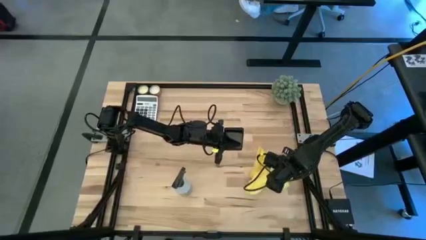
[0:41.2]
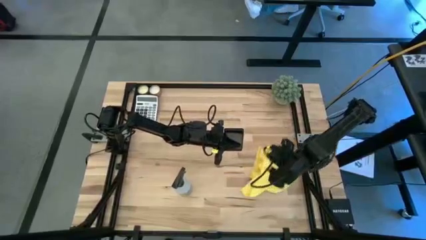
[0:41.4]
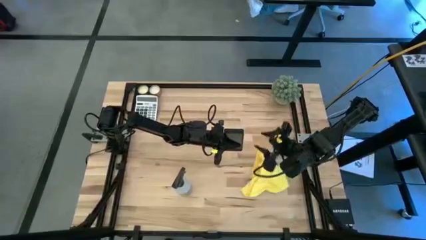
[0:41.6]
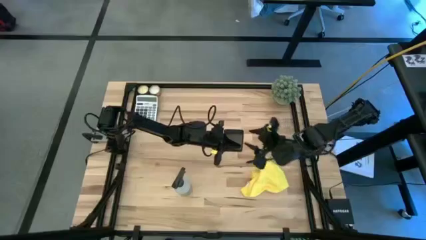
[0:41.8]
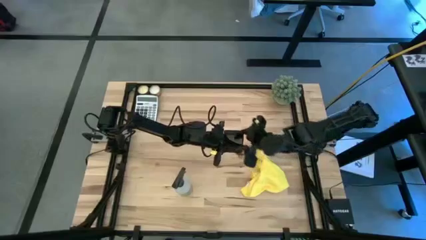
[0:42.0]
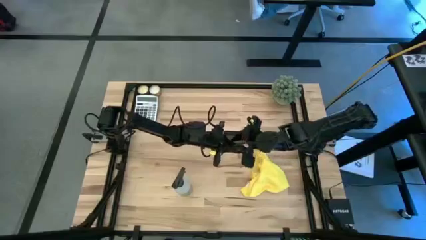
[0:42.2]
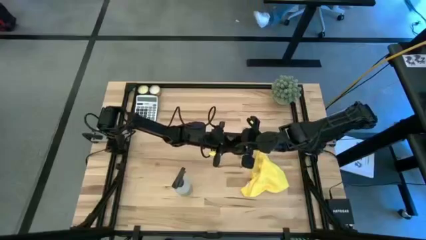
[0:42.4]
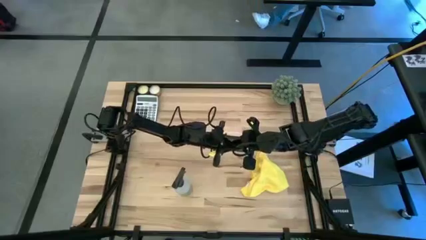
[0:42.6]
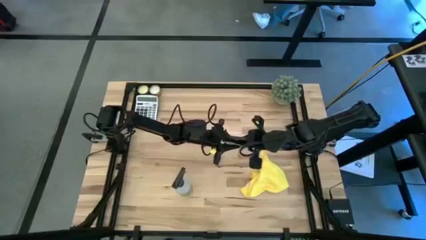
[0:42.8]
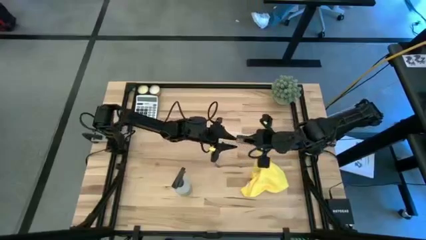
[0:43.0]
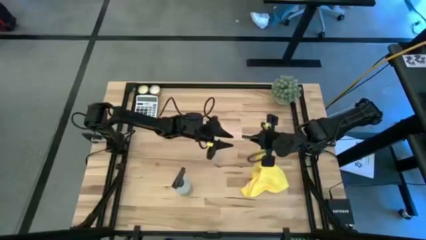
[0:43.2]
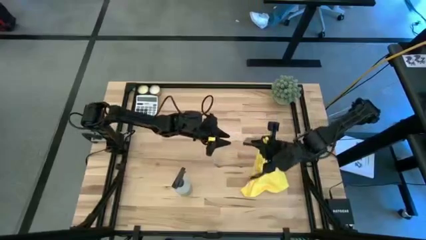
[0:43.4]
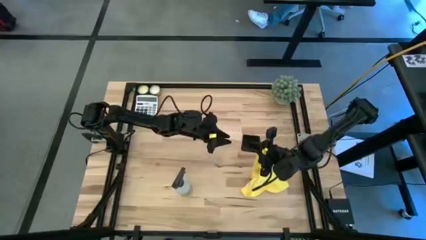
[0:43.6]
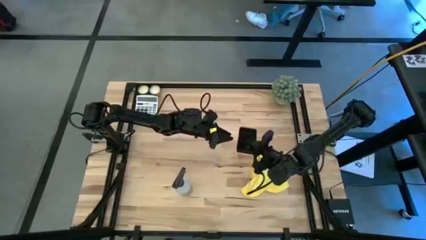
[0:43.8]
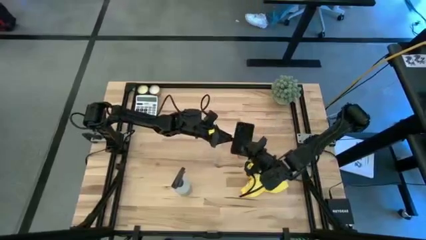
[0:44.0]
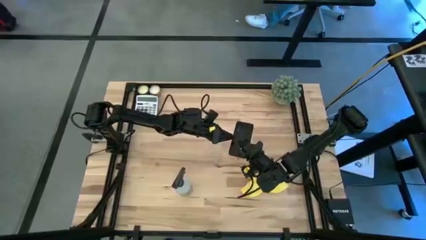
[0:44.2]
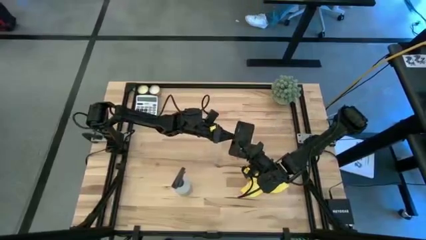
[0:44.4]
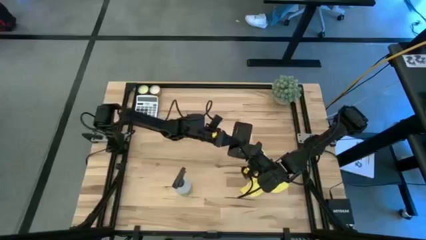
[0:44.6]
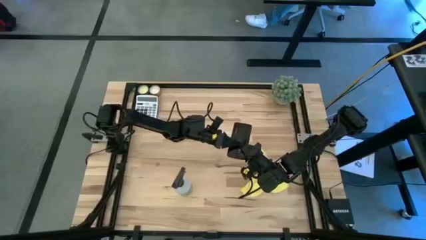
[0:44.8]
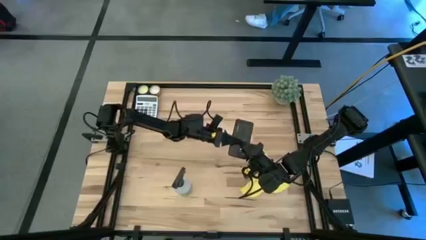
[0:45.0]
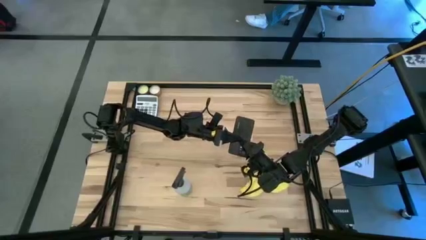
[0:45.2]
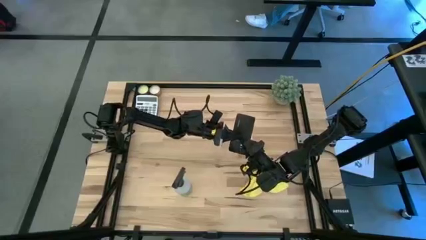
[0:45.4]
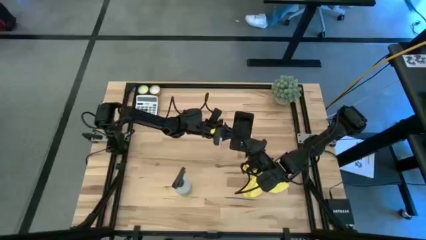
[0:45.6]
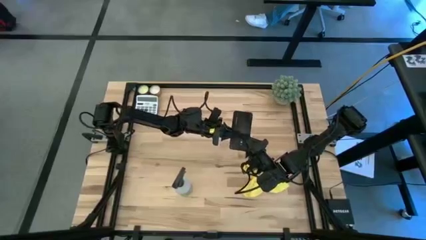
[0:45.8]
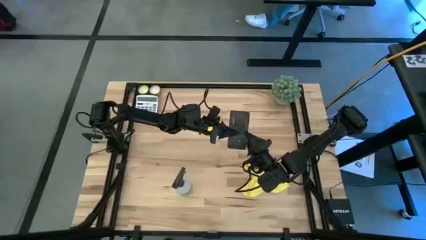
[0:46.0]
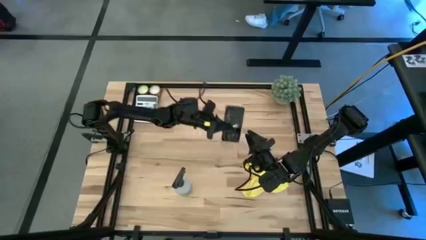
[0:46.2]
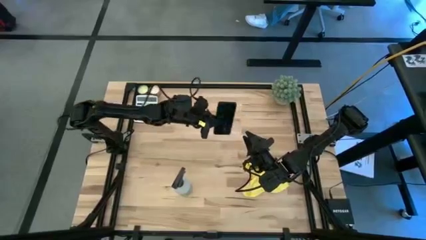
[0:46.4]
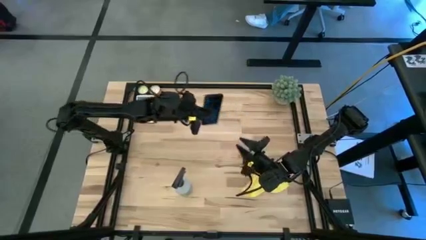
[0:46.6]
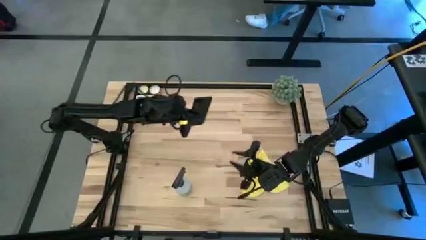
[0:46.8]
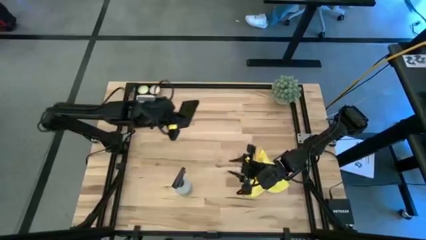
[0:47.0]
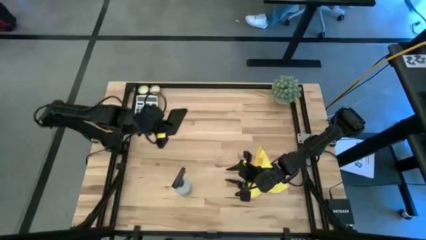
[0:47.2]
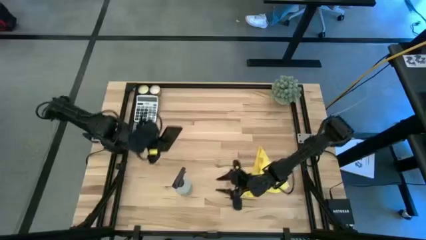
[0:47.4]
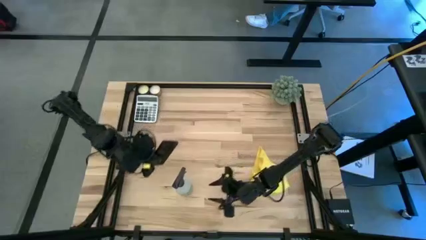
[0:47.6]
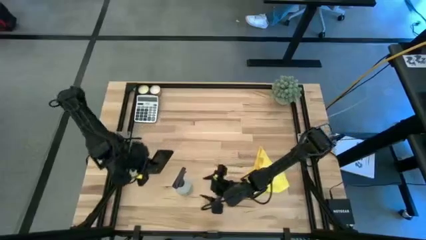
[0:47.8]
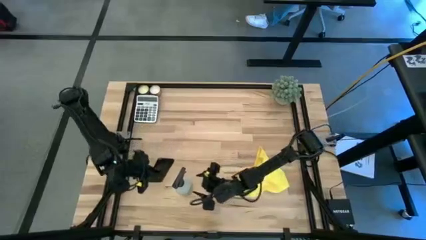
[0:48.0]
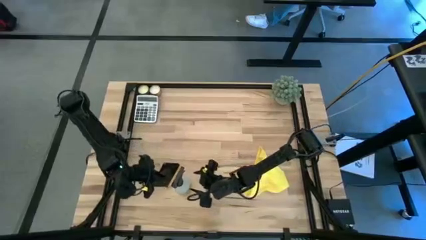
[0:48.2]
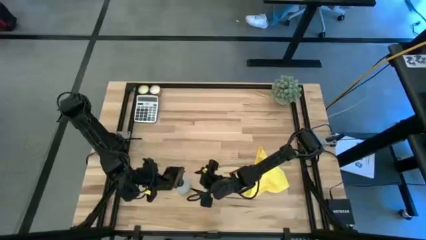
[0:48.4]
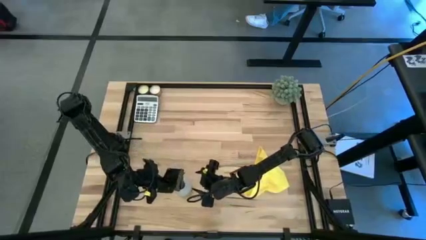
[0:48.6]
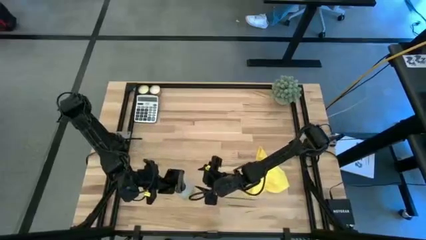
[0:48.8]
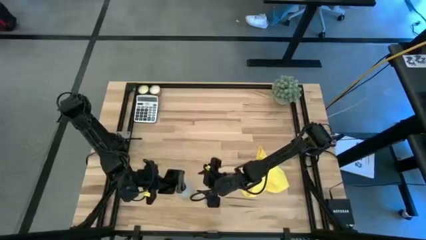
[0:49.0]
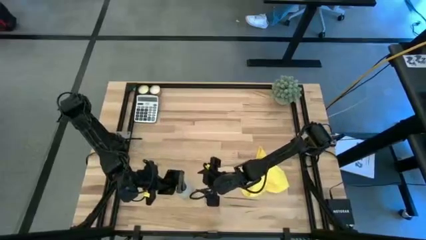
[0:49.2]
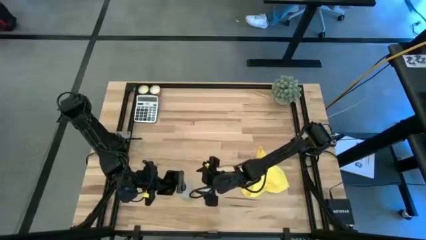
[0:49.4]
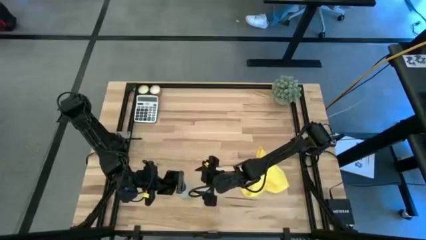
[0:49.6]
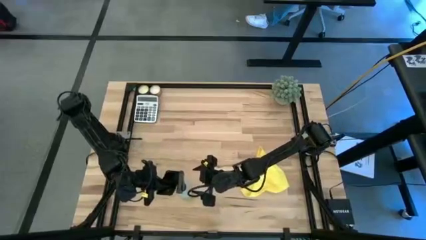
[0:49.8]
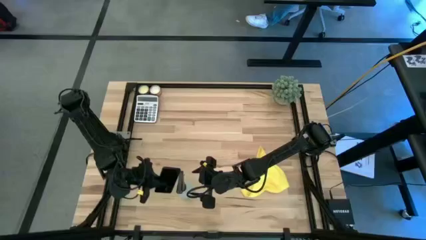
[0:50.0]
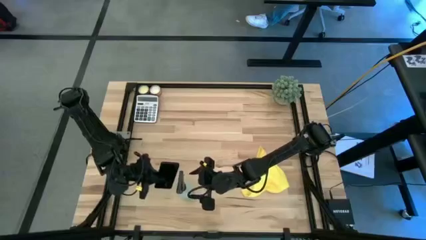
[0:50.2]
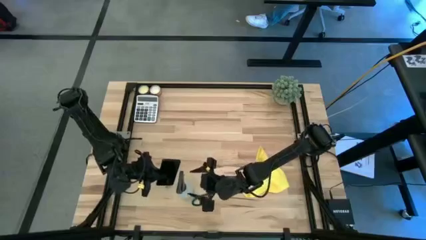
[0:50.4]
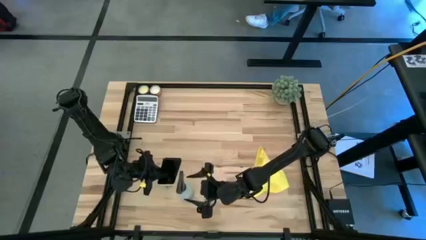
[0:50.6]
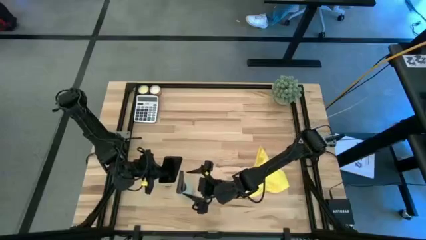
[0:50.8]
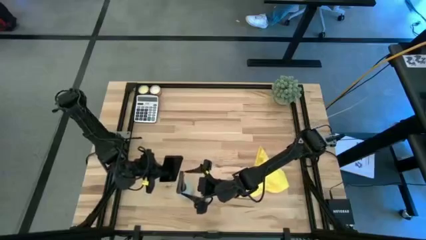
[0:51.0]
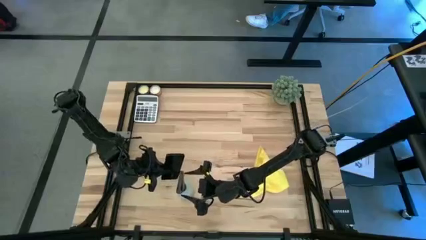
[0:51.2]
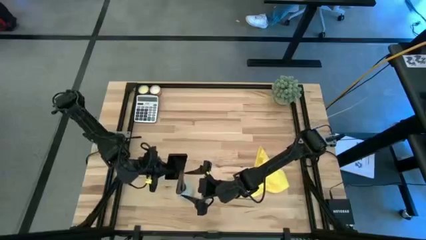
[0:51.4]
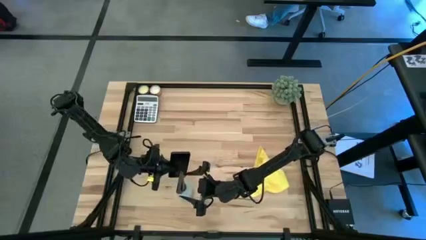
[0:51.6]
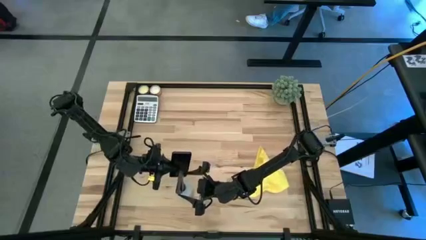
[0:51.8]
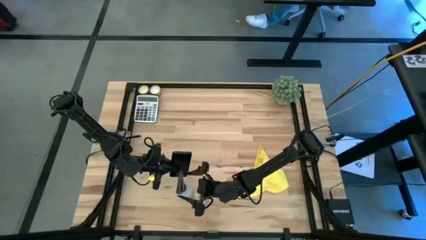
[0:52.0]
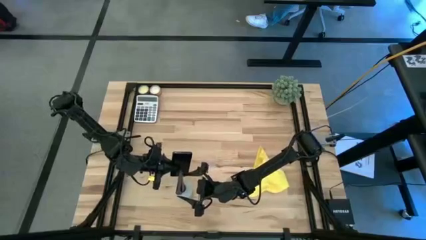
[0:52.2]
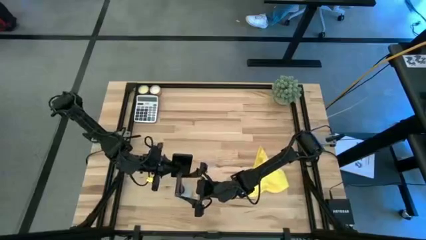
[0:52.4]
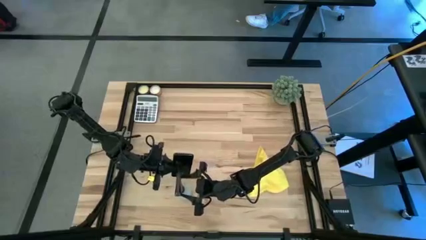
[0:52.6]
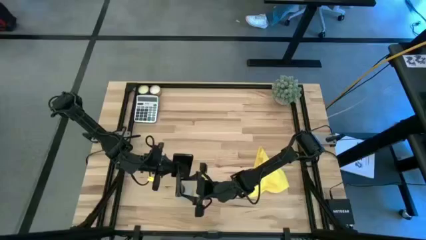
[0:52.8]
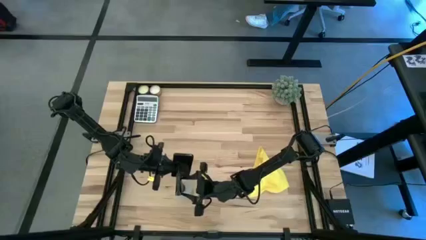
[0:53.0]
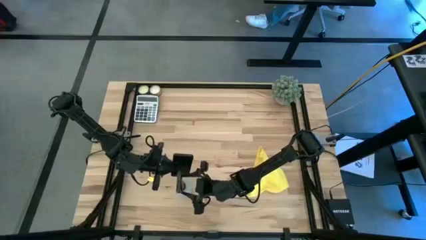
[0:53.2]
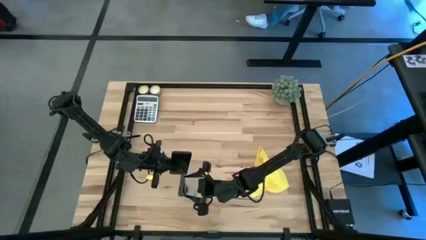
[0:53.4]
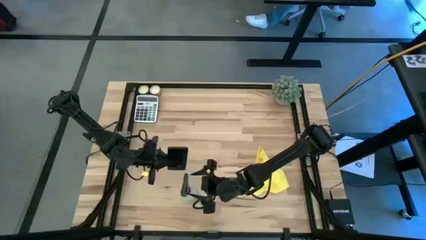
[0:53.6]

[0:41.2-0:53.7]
Task: Apply microfiber cloth
Spray the back of the black cellphone with the white spray bottle
